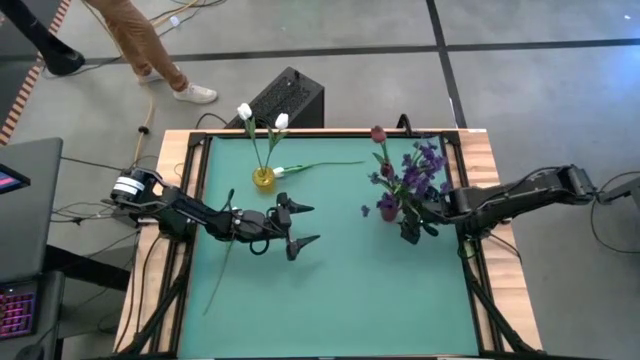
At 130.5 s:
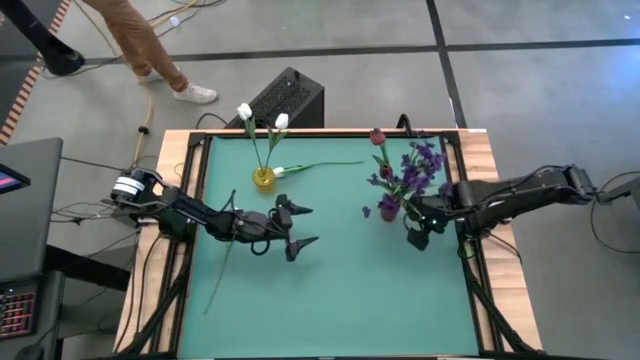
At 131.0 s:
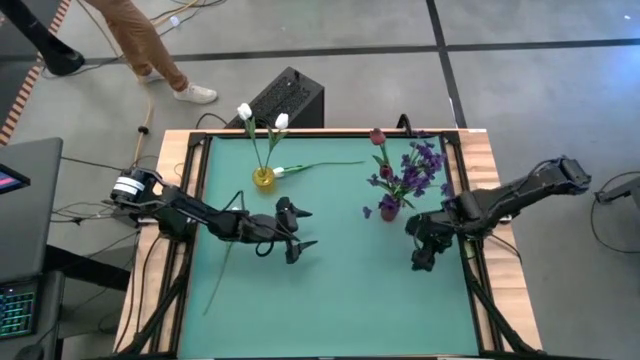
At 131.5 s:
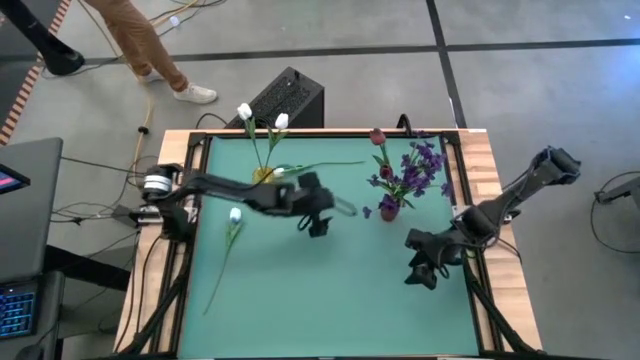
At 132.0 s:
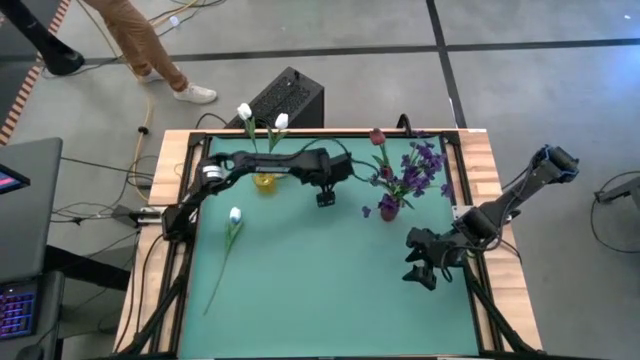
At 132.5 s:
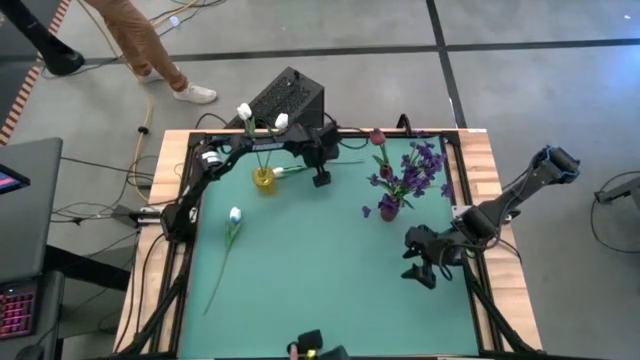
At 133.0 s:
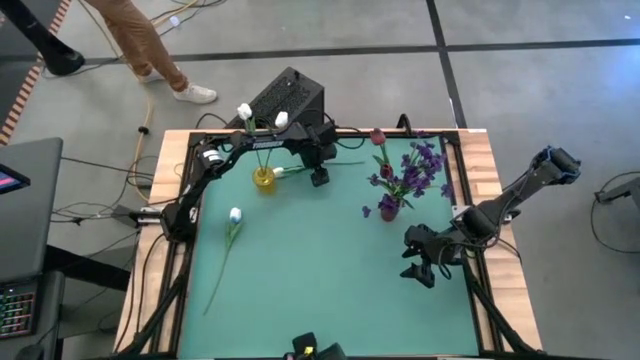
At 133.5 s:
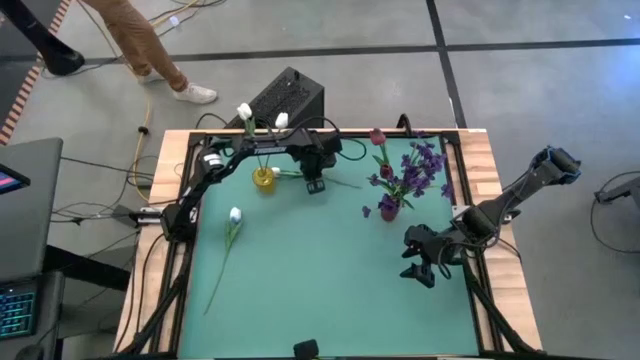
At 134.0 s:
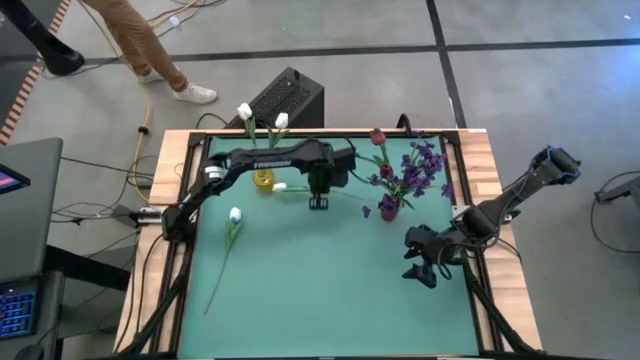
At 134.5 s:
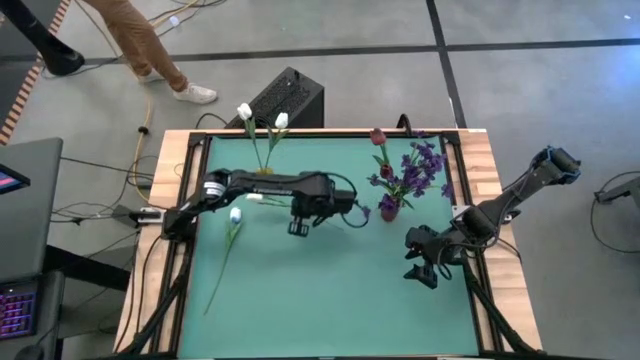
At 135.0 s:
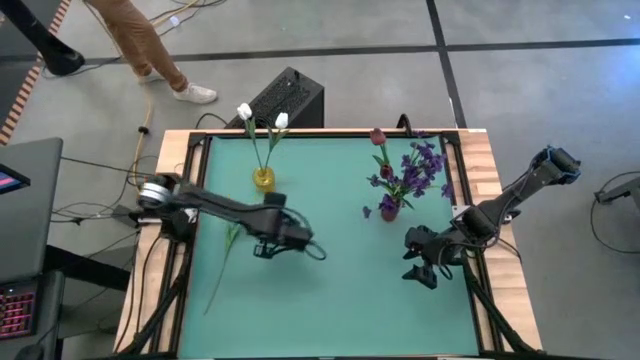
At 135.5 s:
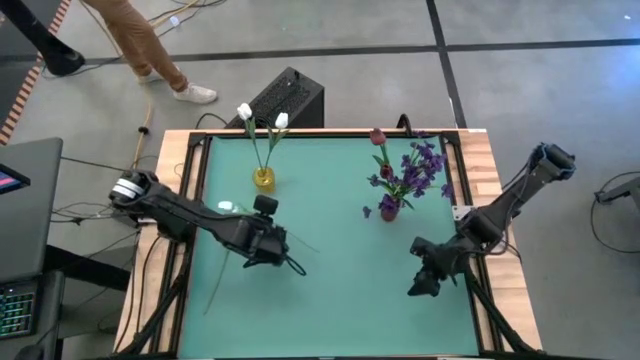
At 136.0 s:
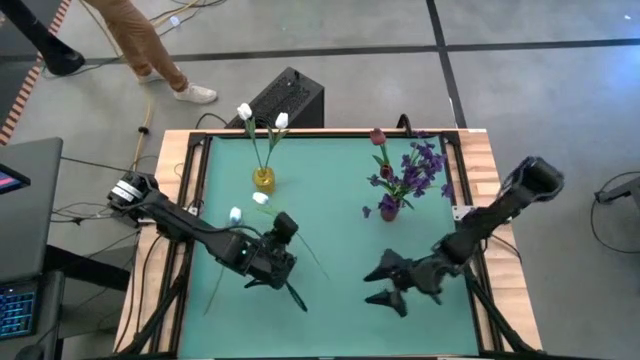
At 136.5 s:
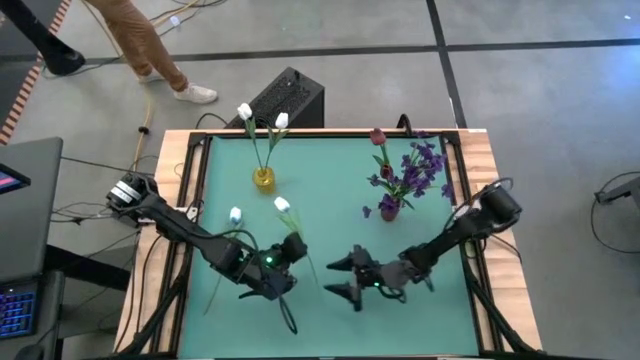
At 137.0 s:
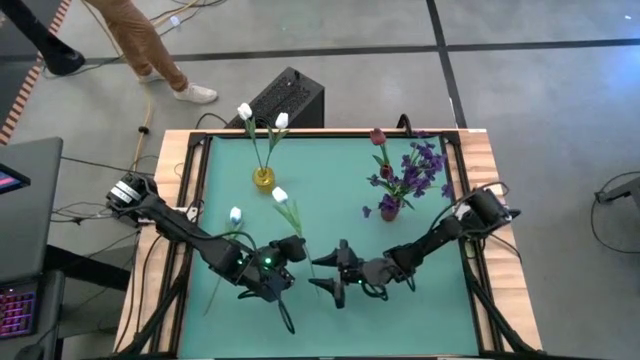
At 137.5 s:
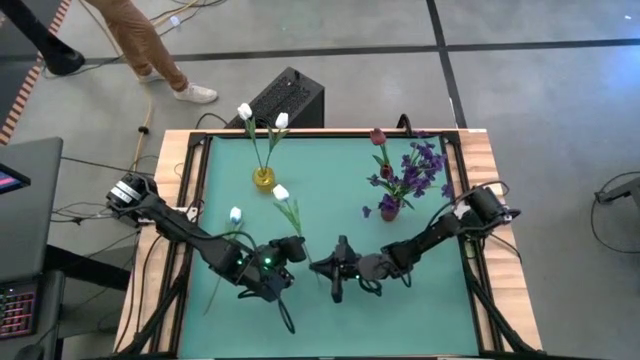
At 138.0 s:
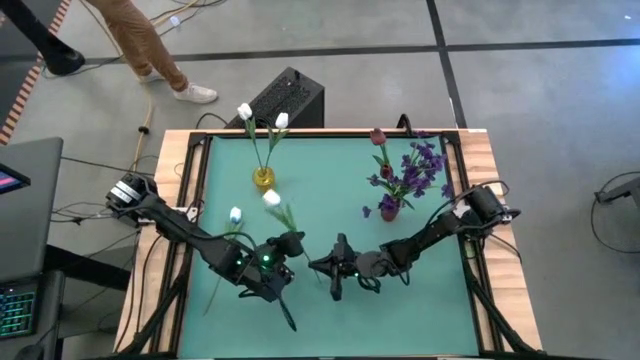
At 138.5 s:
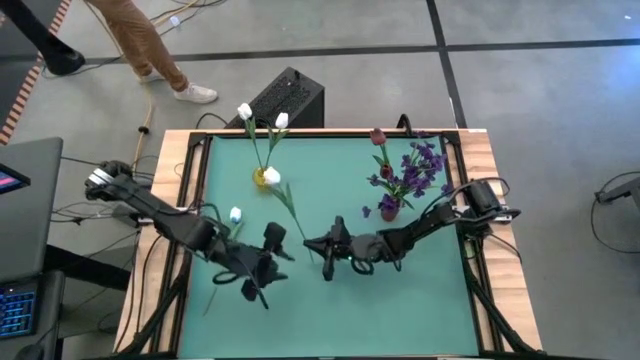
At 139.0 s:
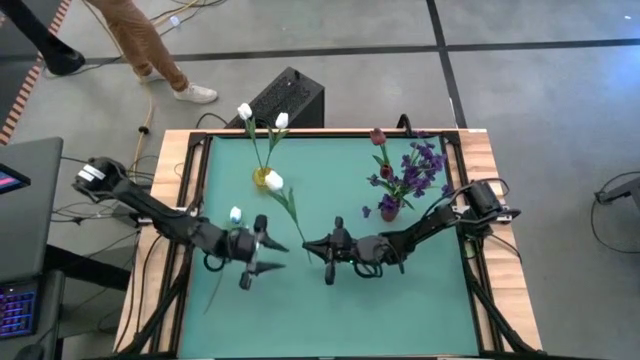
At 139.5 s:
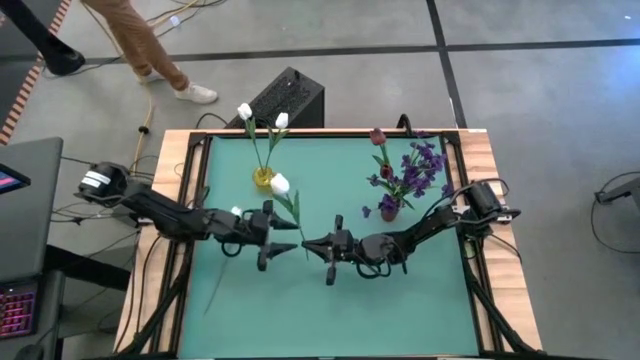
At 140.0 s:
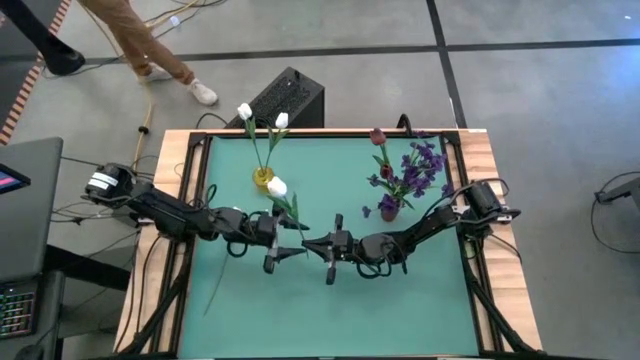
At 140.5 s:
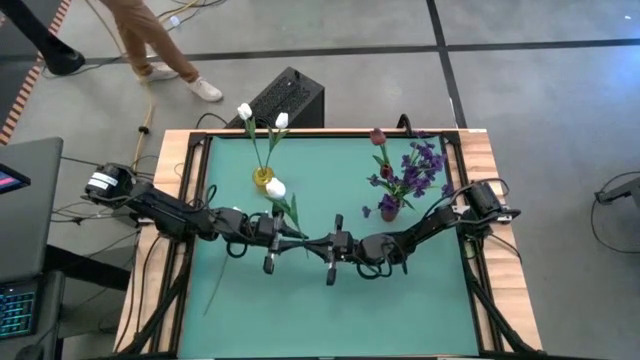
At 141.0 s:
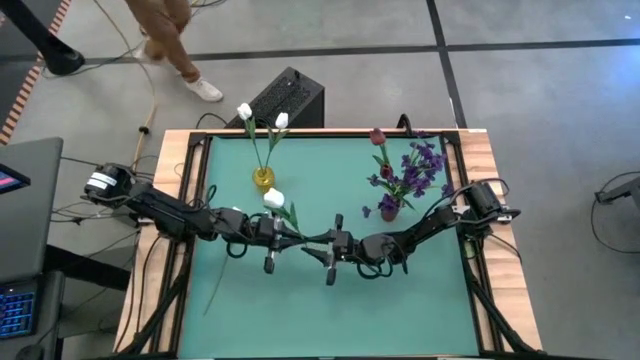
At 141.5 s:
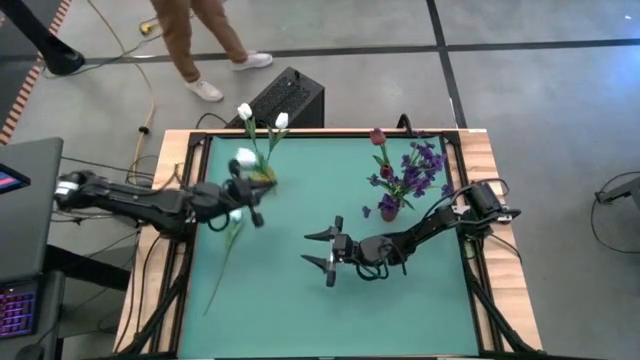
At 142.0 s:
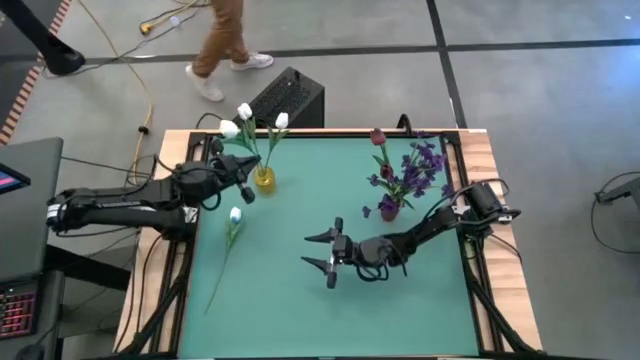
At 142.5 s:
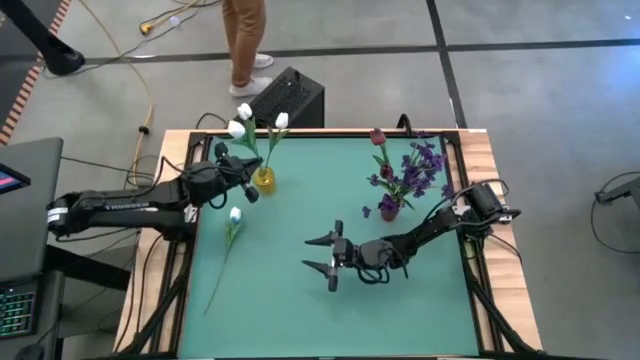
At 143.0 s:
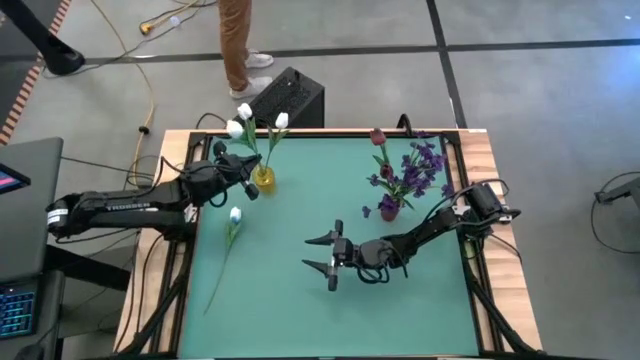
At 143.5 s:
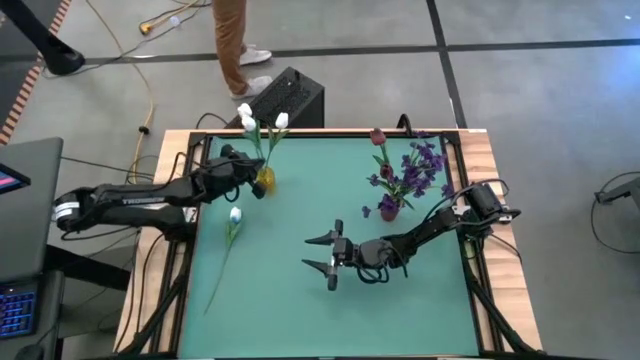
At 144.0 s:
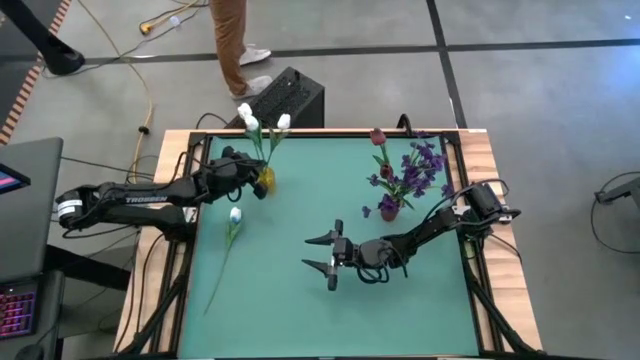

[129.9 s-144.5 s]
Task: Sort flowers into vase by color
Put the top white flower into the yellow vase

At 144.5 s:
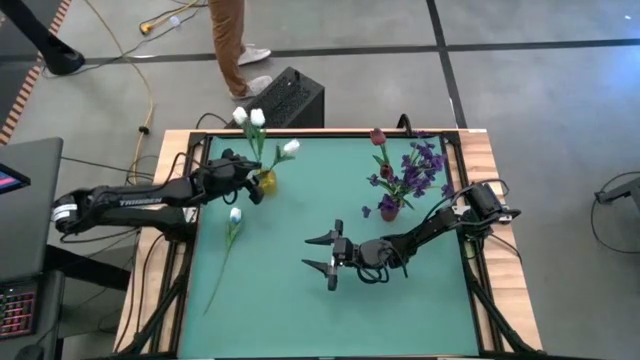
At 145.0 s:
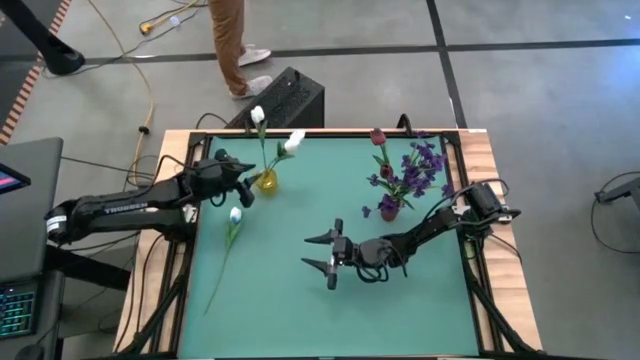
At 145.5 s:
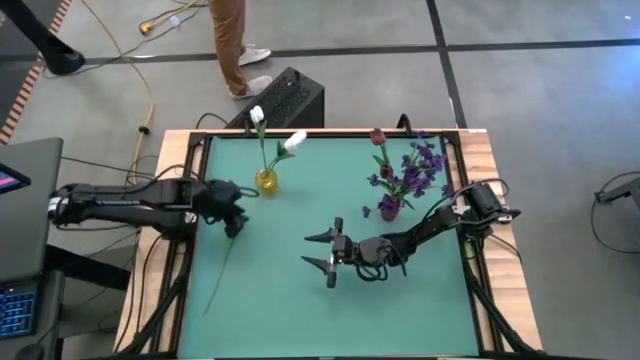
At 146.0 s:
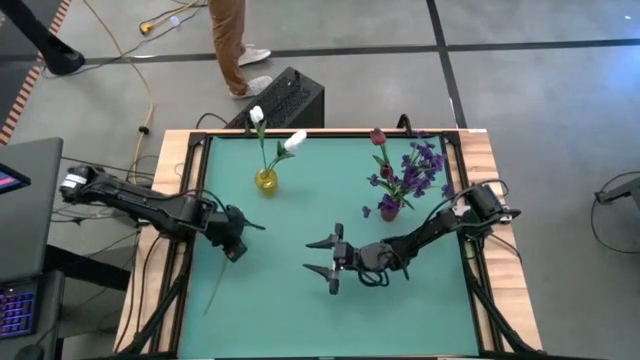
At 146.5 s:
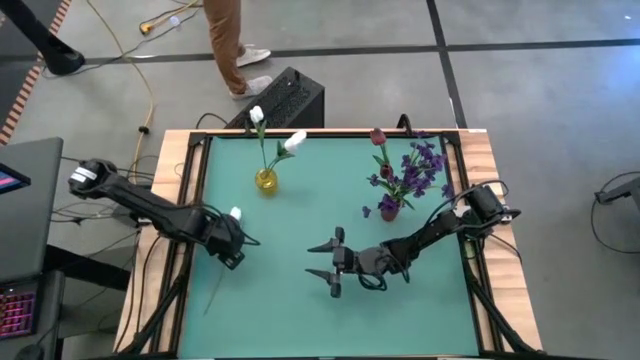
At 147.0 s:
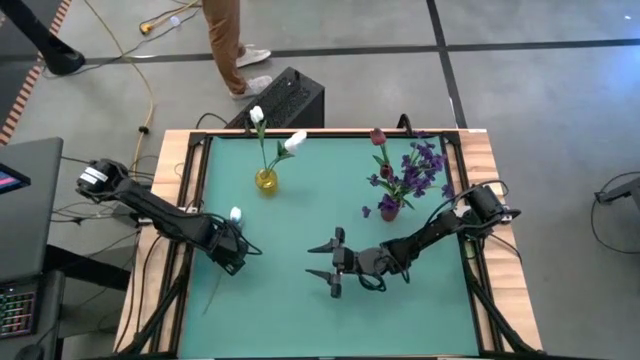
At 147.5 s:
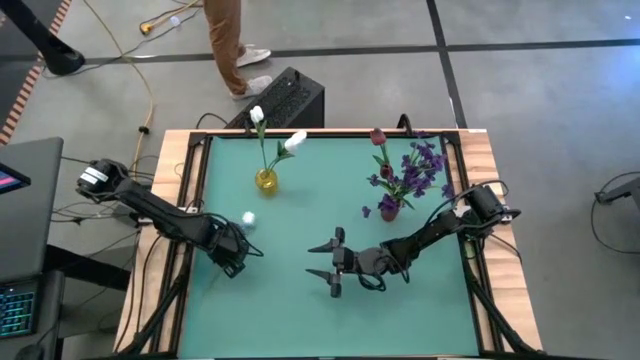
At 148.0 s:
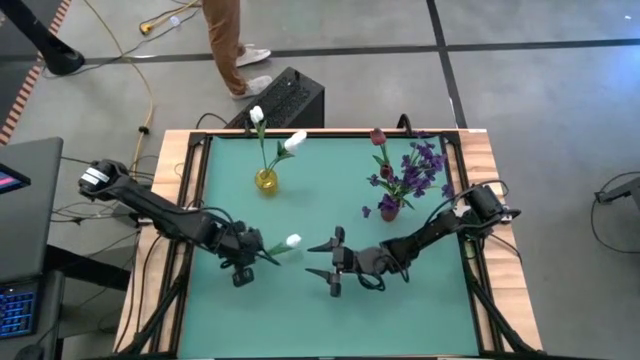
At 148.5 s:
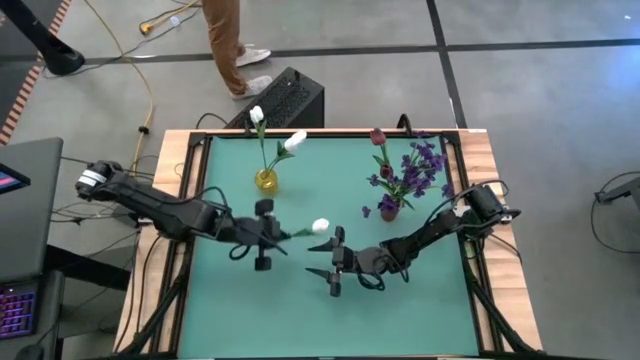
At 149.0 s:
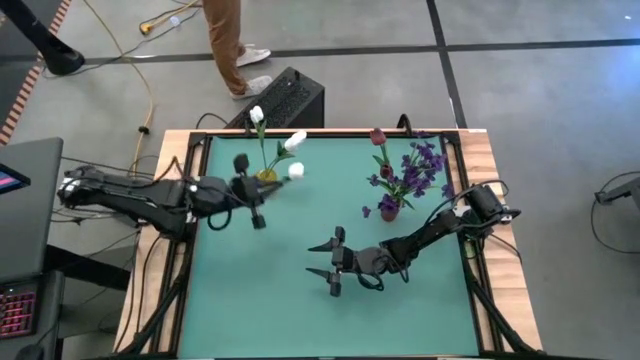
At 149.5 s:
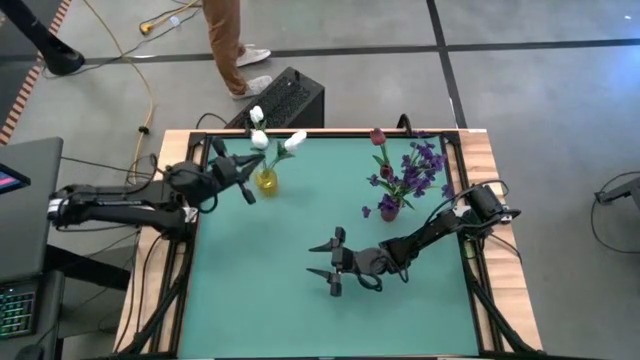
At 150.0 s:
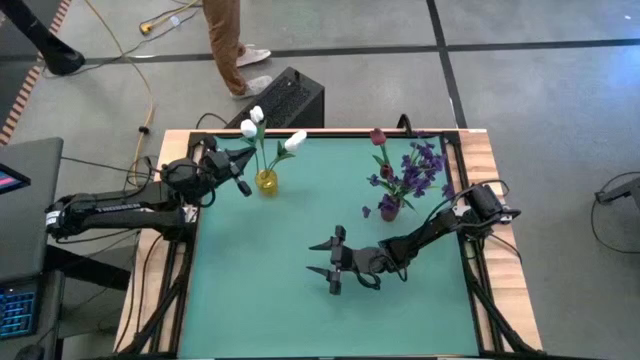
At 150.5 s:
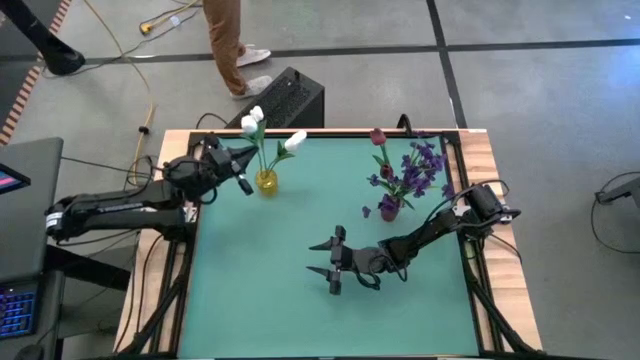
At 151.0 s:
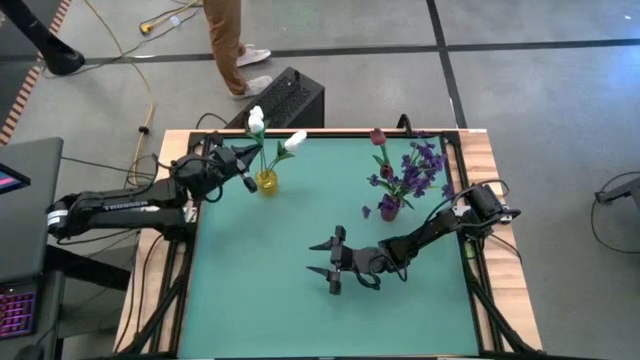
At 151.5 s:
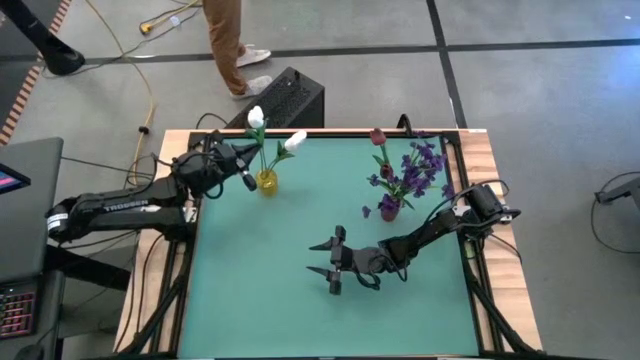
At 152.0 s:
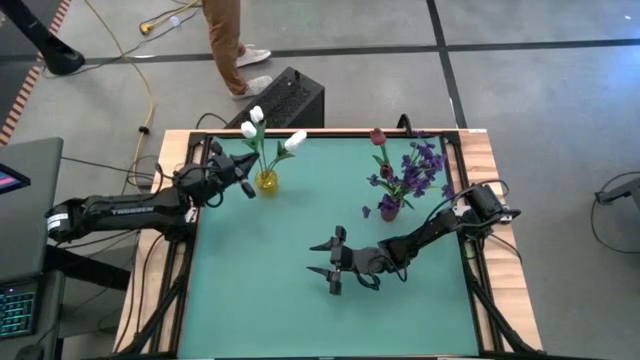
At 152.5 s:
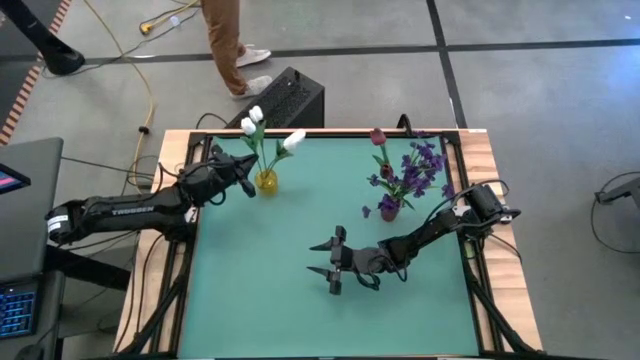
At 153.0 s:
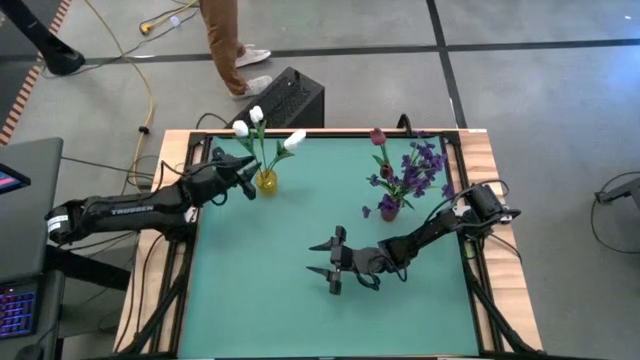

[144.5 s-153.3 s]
Put the white flower into the yellow vase
